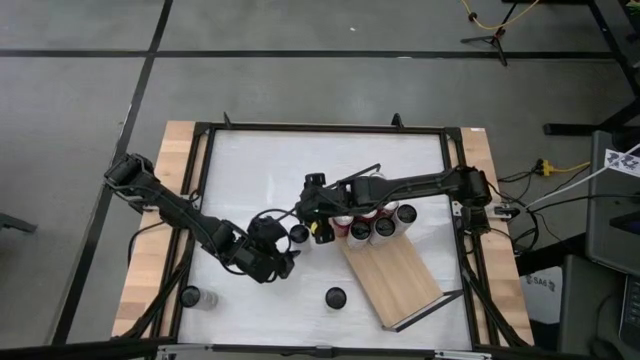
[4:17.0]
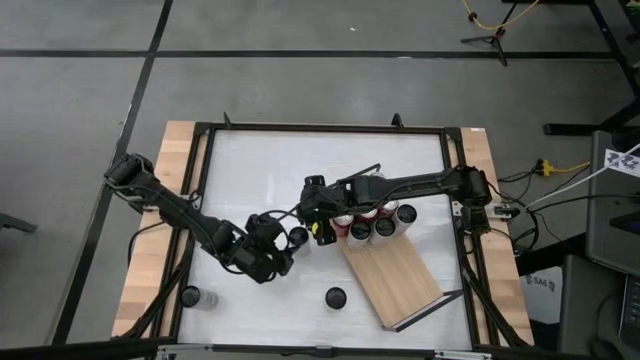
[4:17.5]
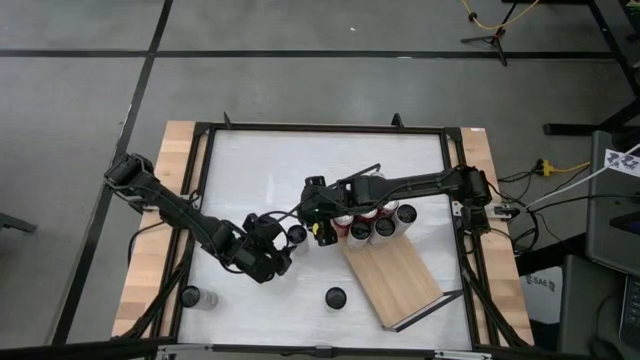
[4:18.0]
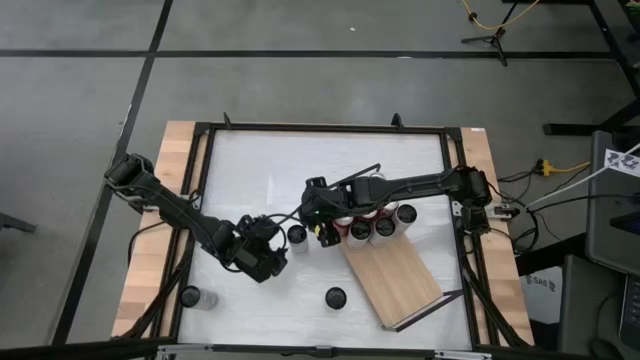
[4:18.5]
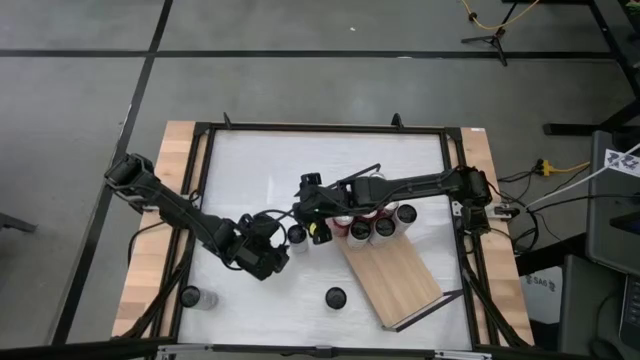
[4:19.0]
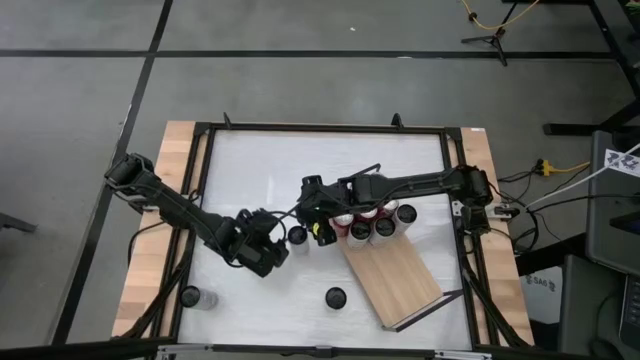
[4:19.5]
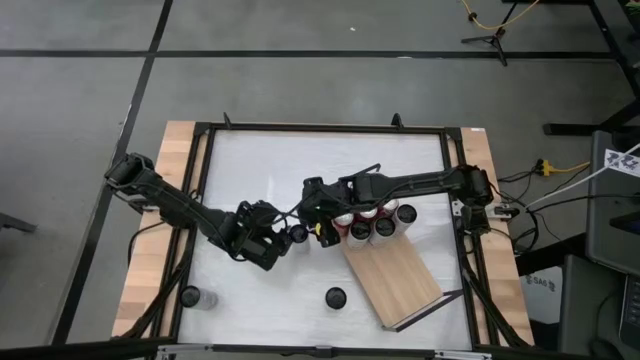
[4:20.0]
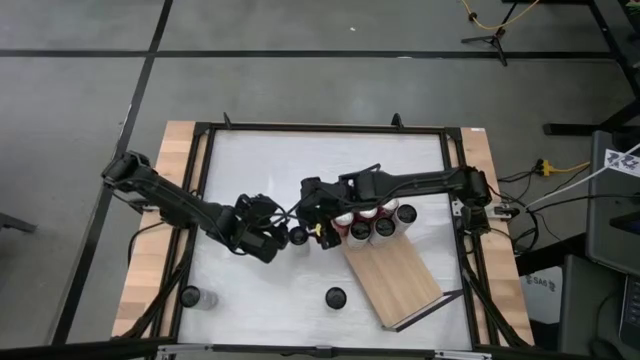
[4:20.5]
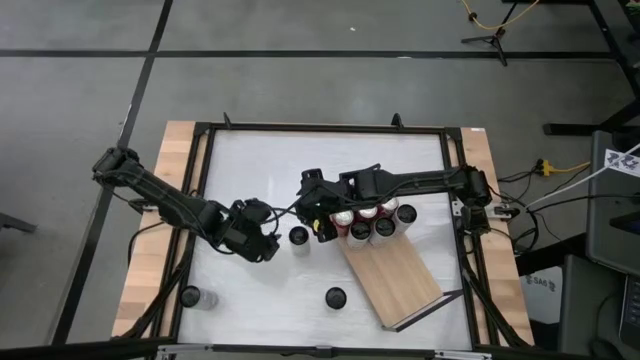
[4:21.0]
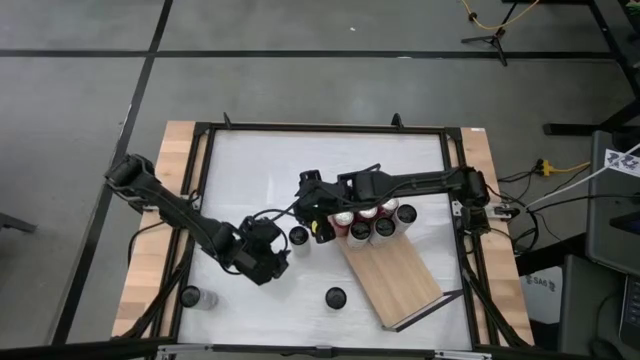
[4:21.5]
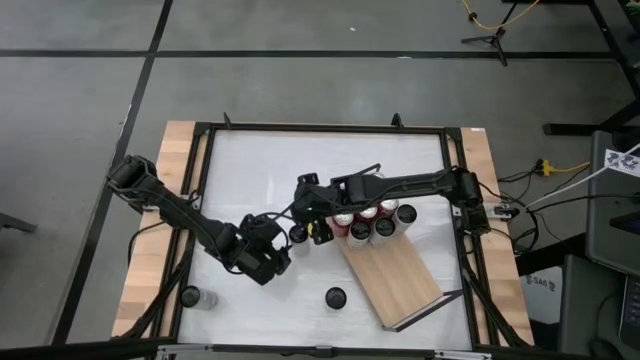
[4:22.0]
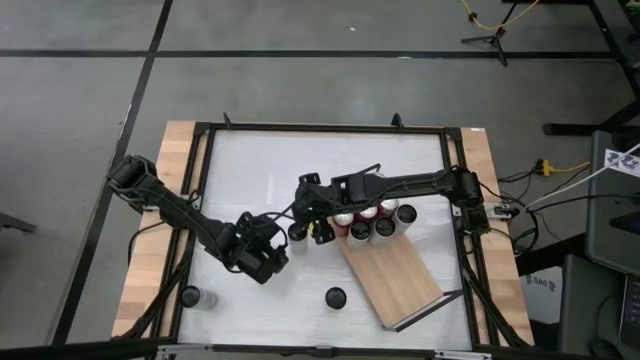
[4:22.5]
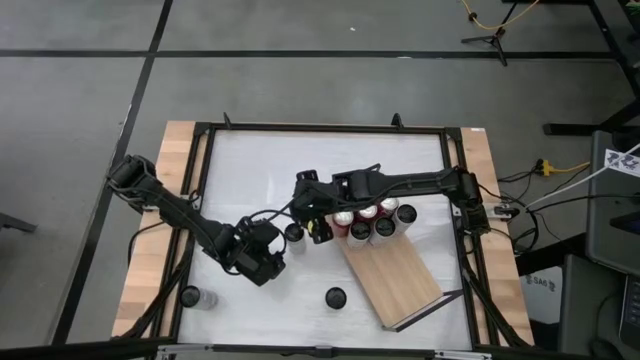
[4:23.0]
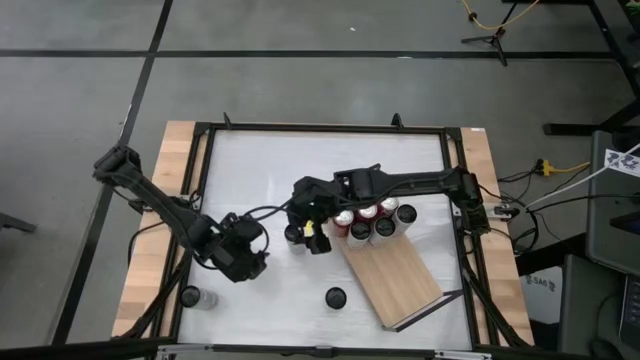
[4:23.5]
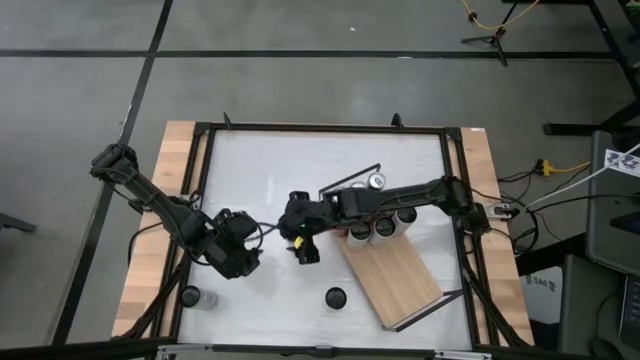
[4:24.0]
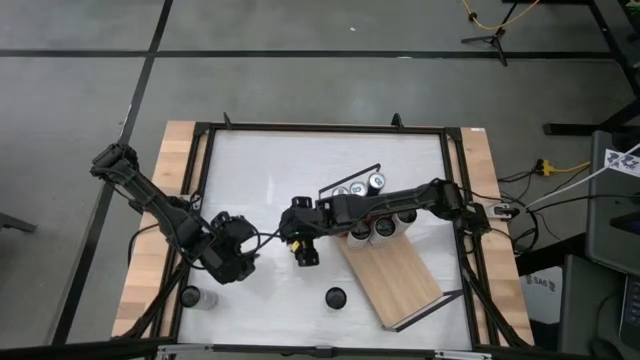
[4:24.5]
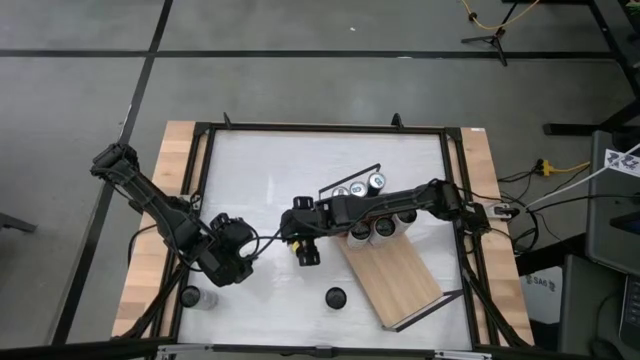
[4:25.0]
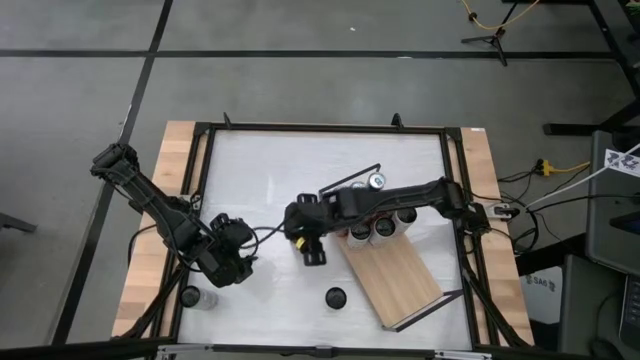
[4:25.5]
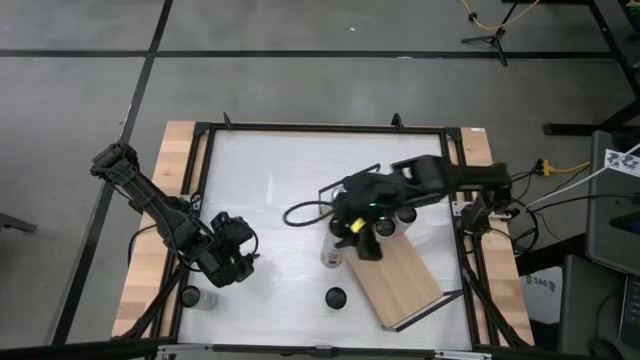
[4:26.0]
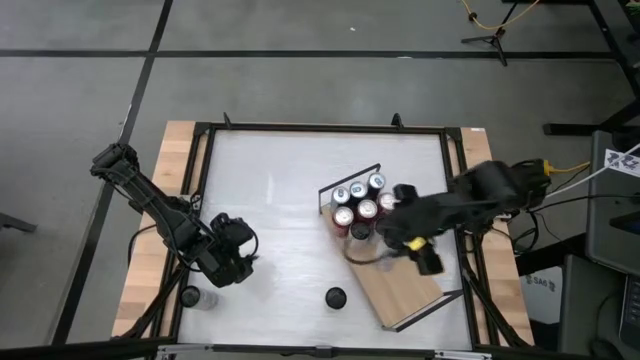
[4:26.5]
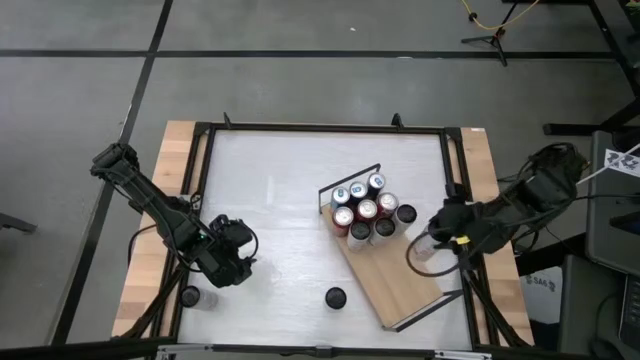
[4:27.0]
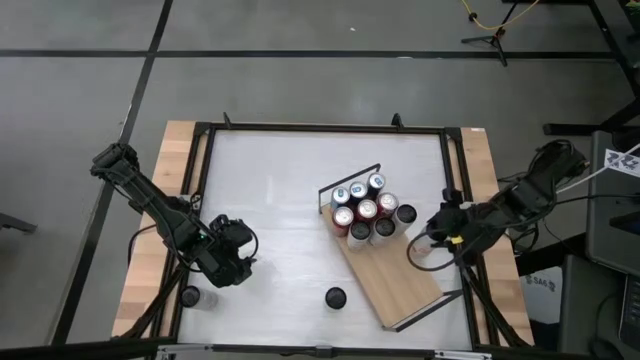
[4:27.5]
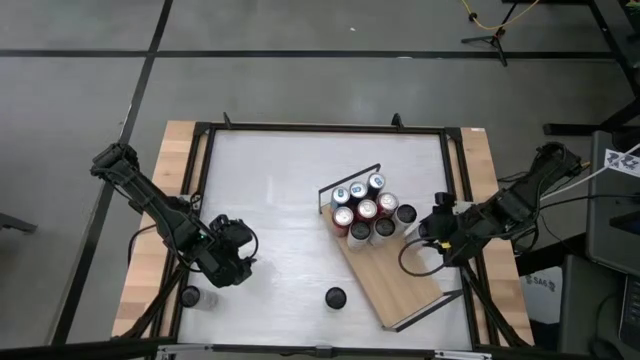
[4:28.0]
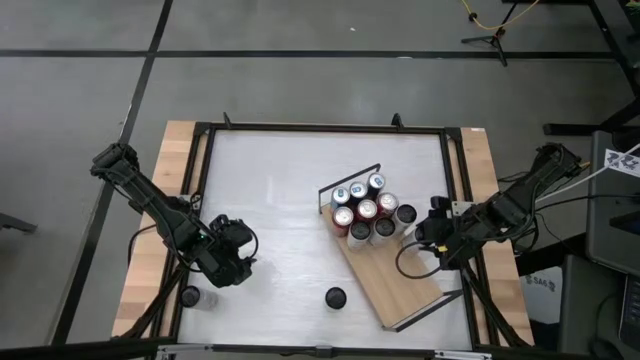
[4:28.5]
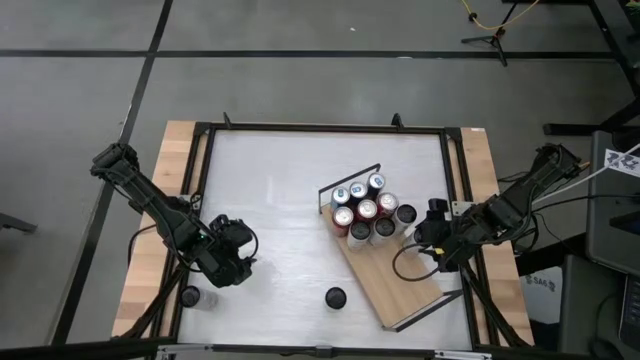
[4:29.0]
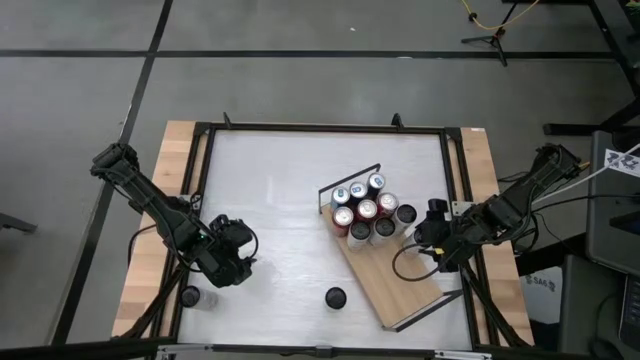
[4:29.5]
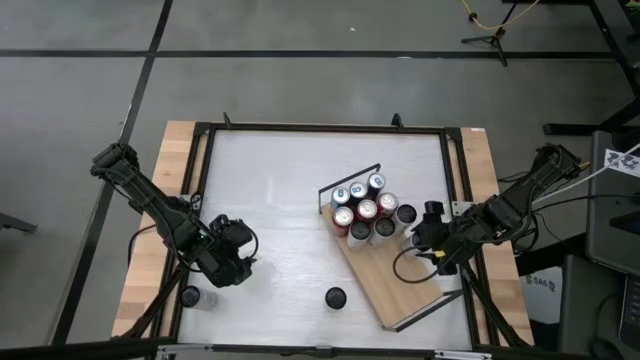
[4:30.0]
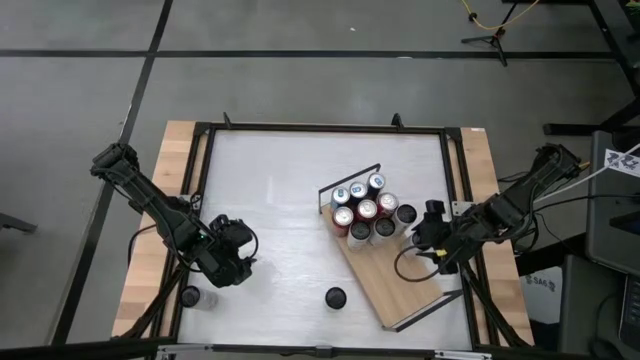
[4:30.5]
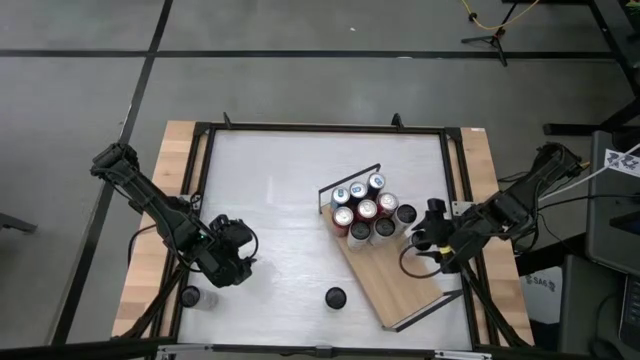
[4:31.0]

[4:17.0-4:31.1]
Task: Place canned beverage on shelf
Put the white pink soda can on the shelf aligned with the other white pink soda cans

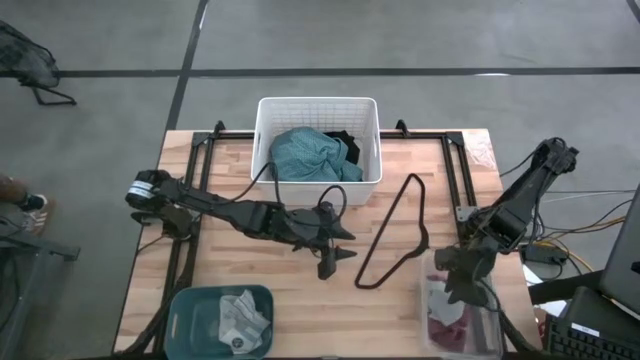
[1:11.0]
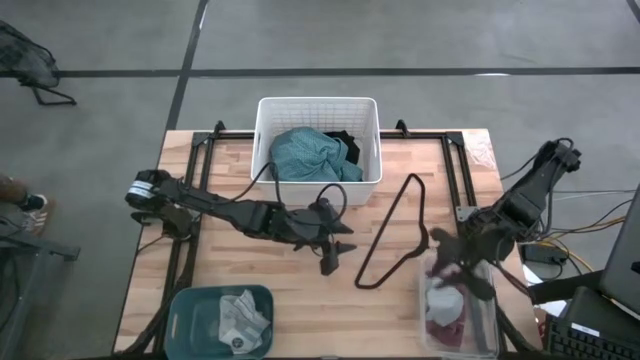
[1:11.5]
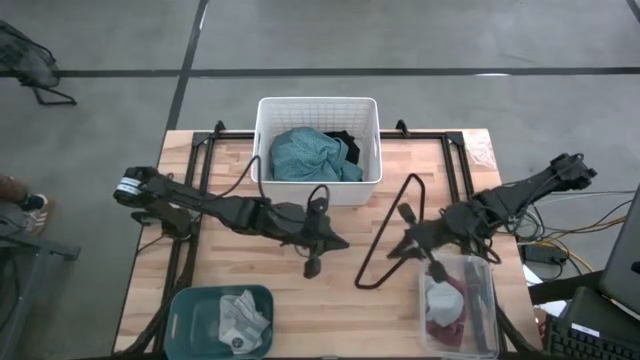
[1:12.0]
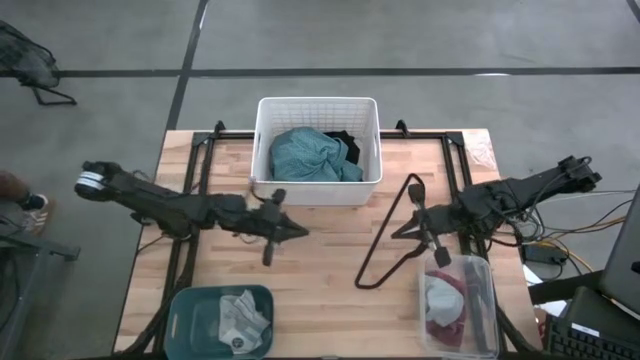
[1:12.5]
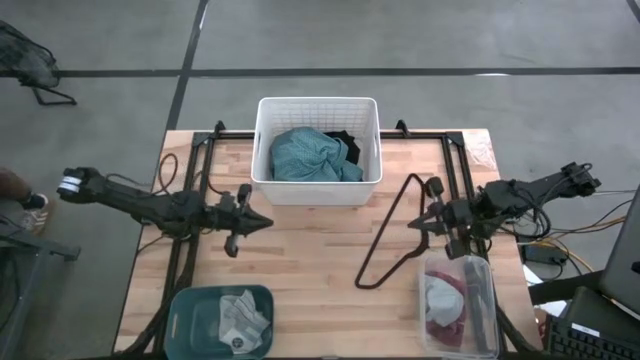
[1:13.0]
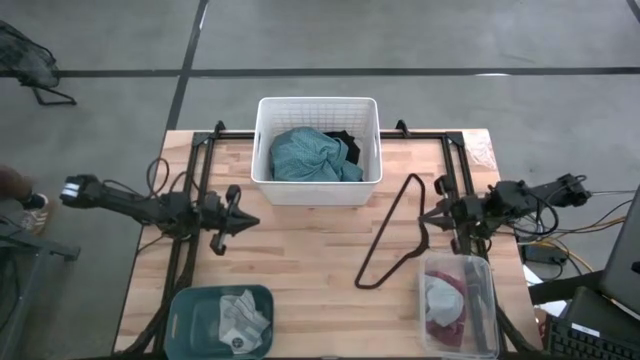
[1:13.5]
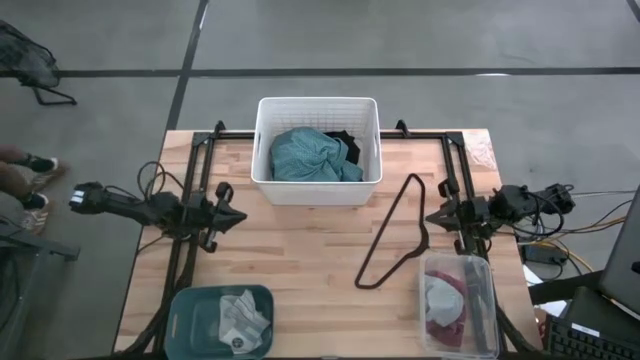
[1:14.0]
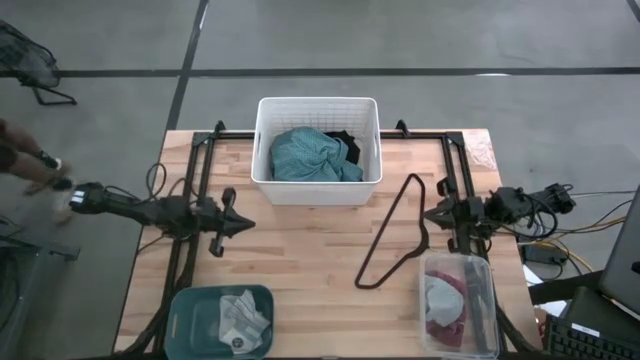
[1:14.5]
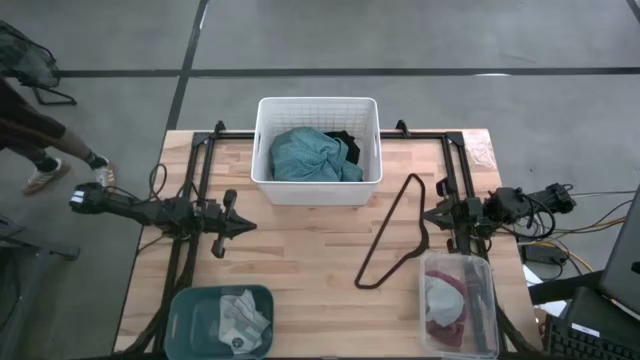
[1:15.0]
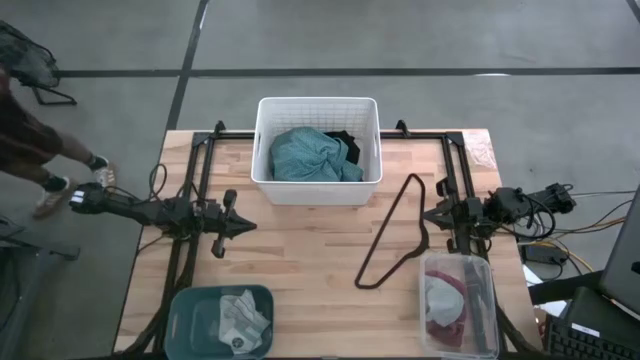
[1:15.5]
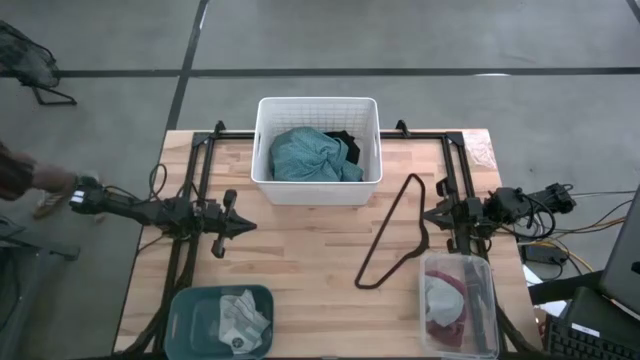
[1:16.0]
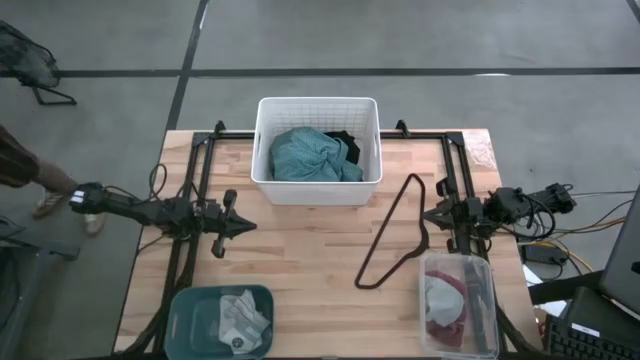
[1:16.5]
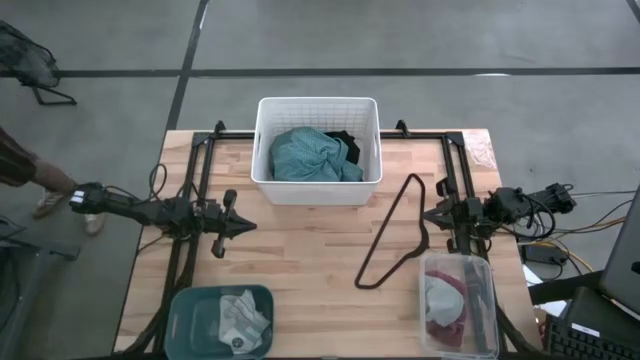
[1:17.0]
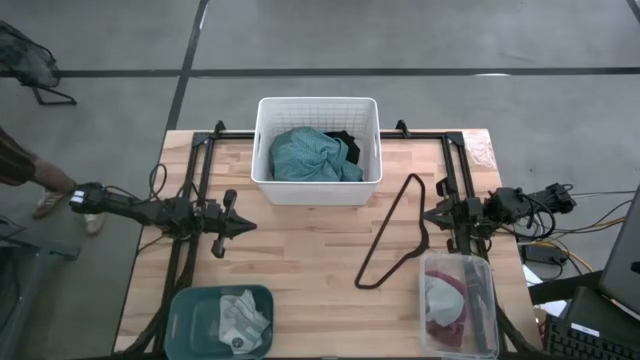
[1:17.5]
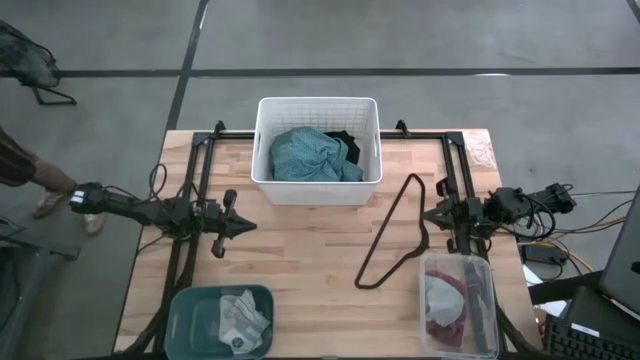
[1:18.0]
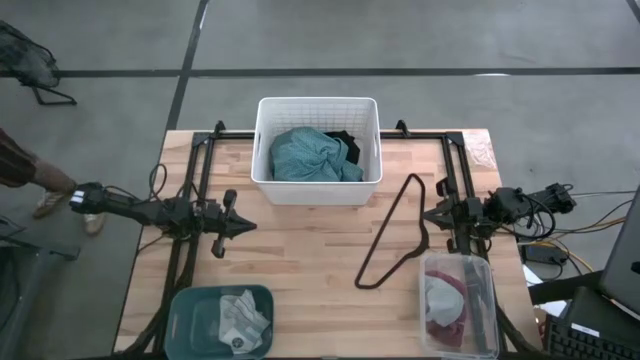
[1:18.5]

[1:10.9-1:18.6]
Task: Pick & Place Cloths
Return to Home Position
